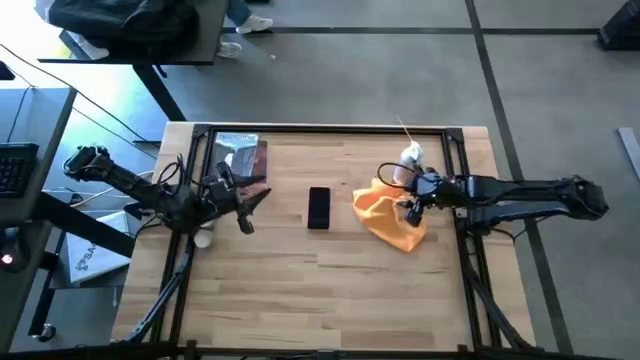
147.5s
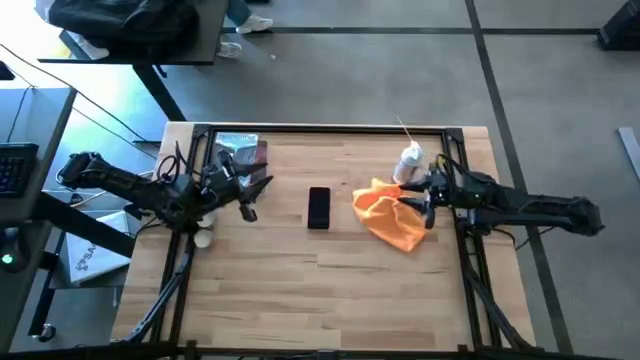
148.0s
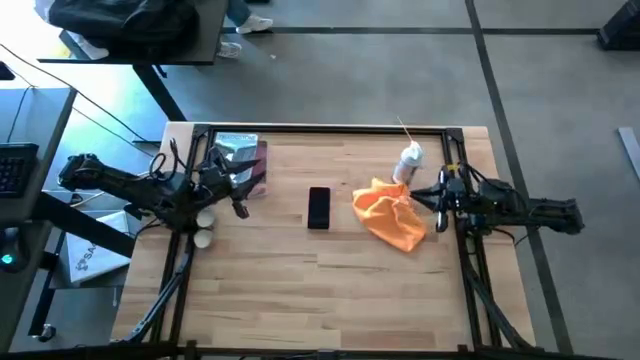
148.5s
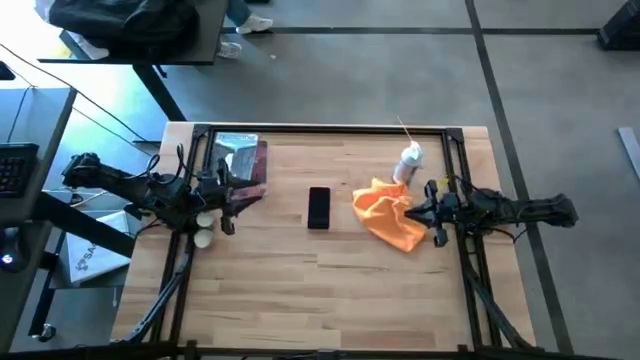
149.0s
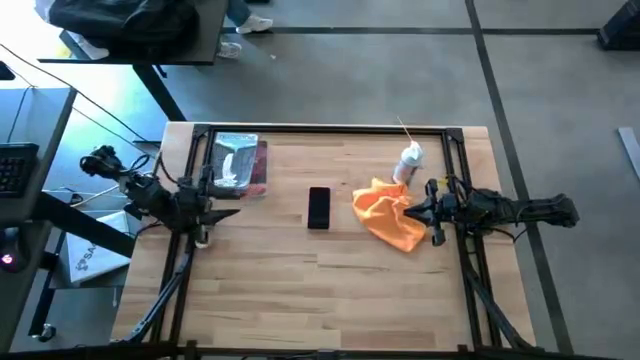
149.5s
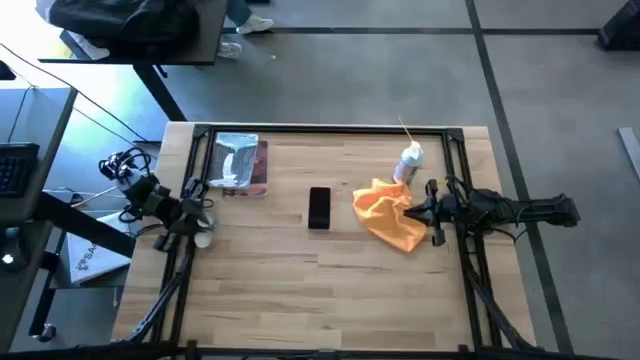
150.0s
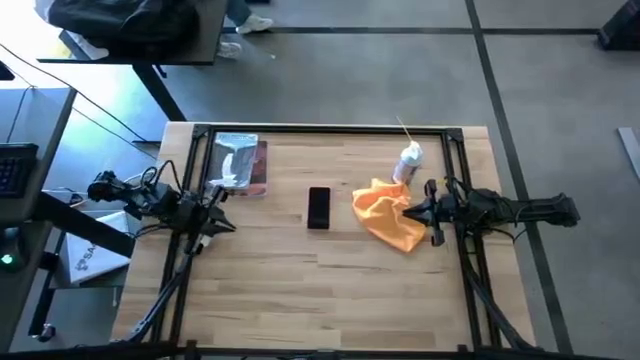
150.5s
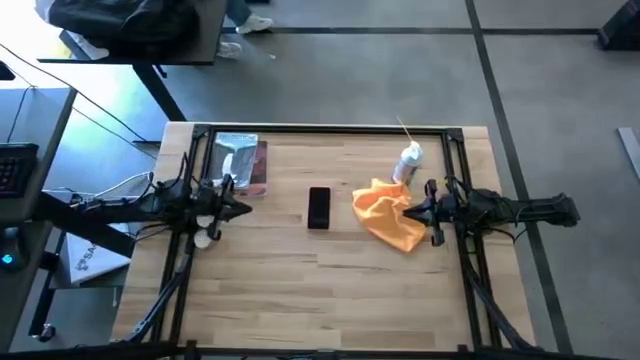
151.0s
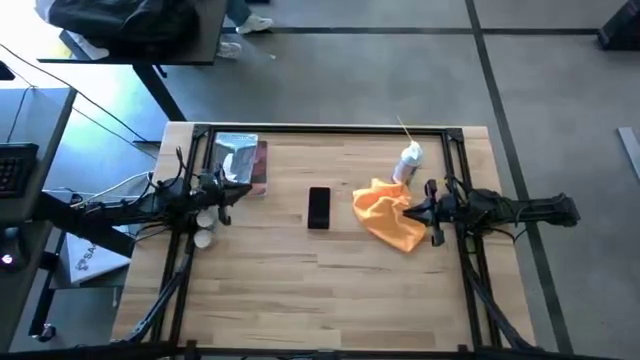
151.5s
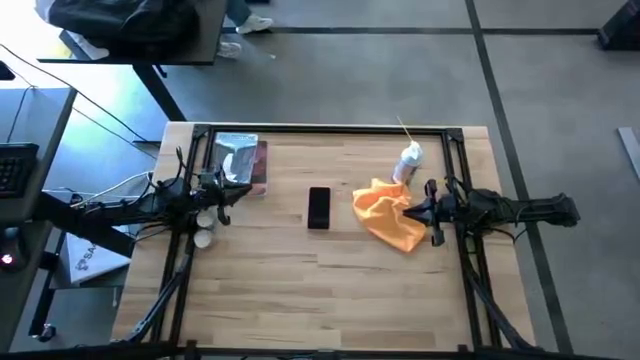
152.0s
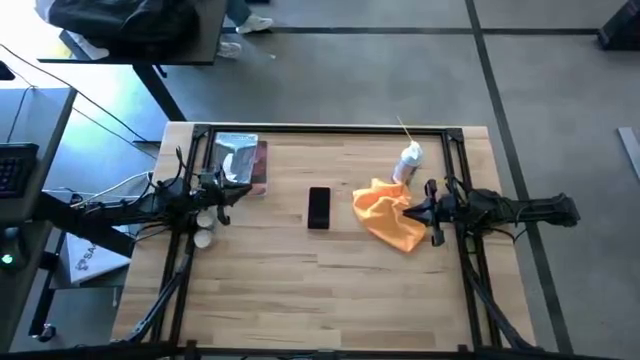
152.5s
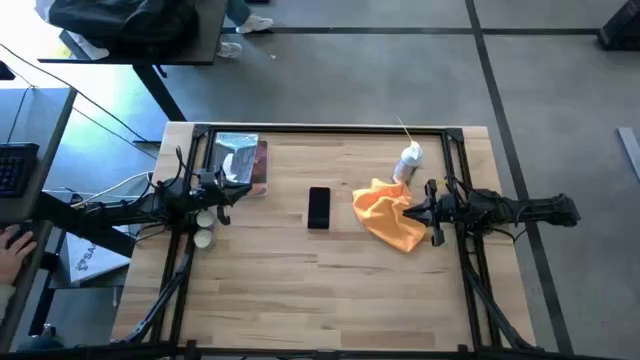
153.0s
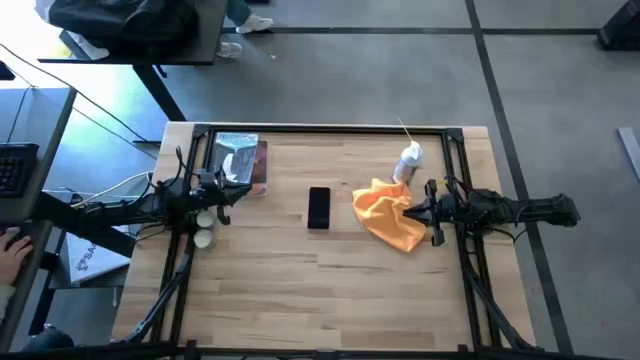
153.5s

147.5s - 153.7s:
Task: Apply microfiber cloth
Return to Home Position

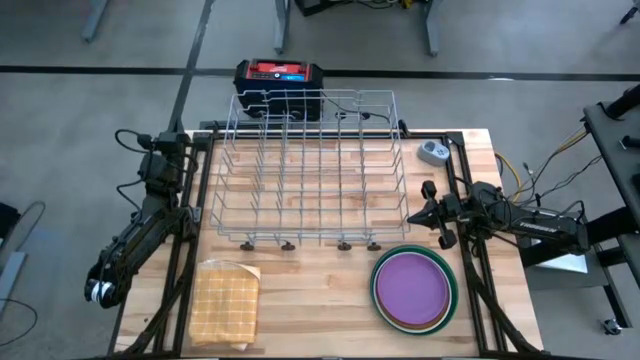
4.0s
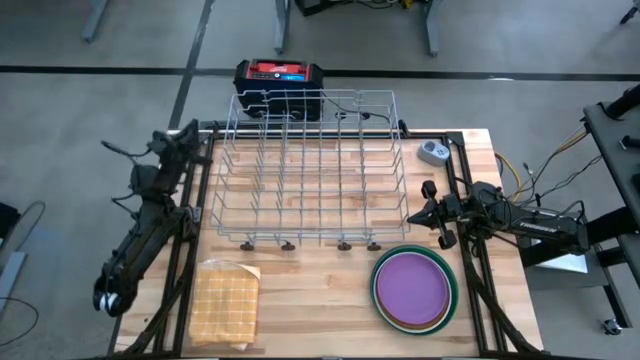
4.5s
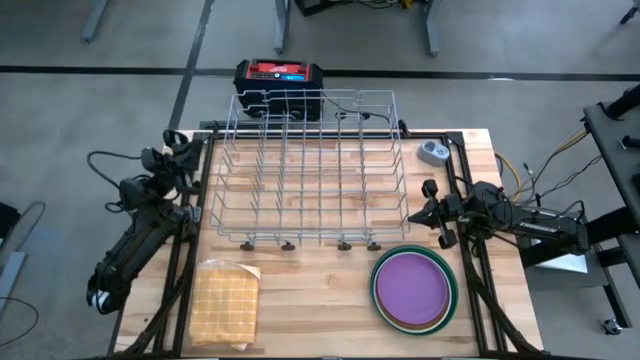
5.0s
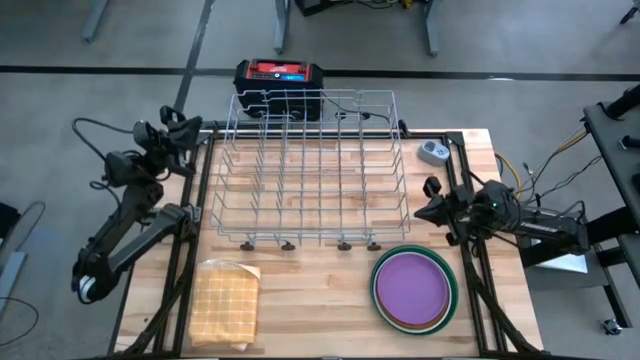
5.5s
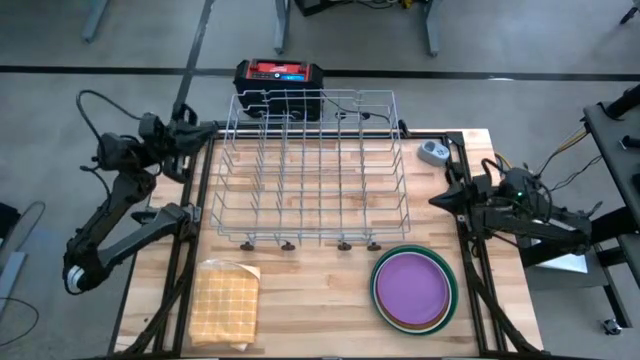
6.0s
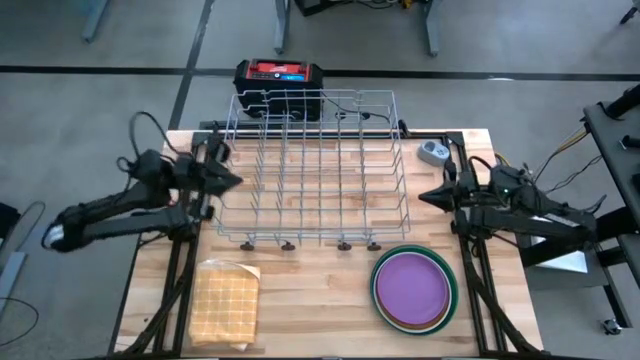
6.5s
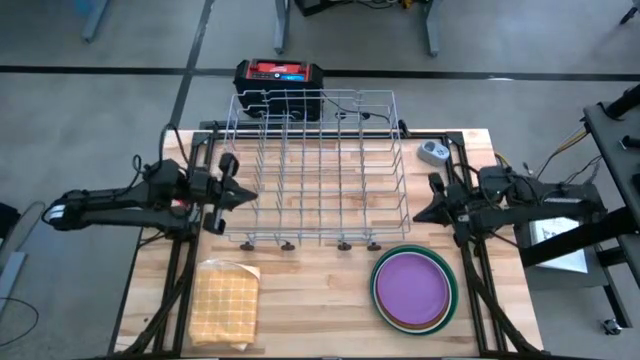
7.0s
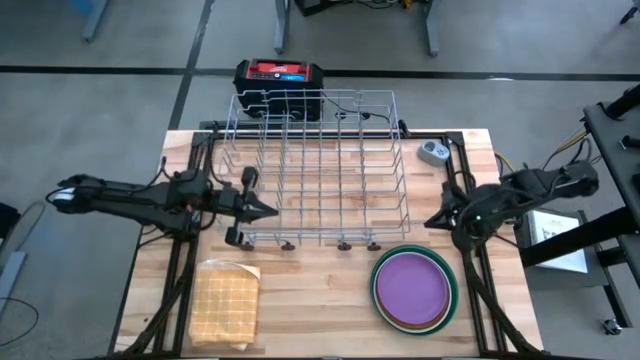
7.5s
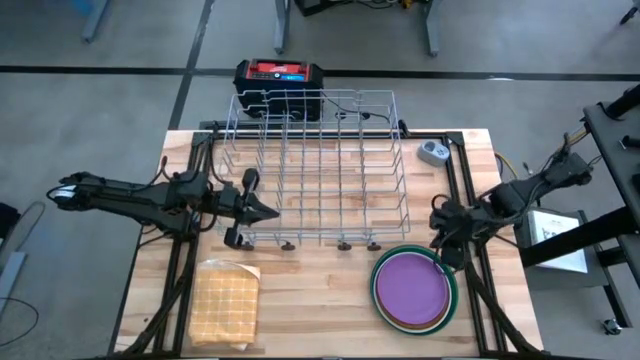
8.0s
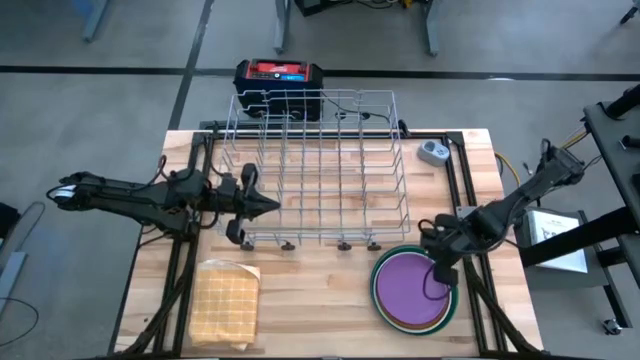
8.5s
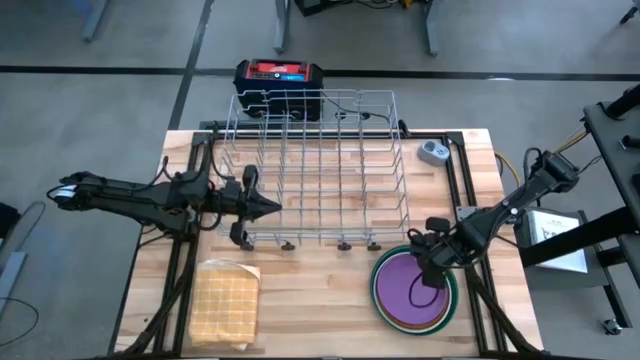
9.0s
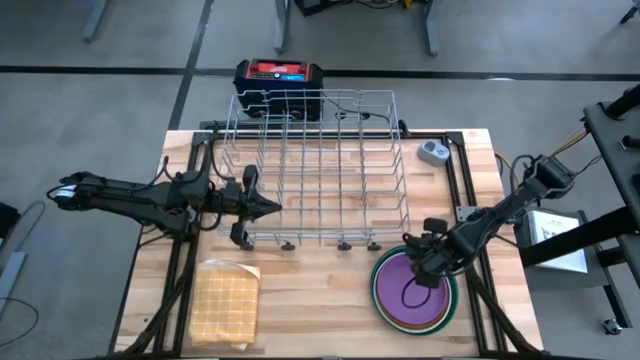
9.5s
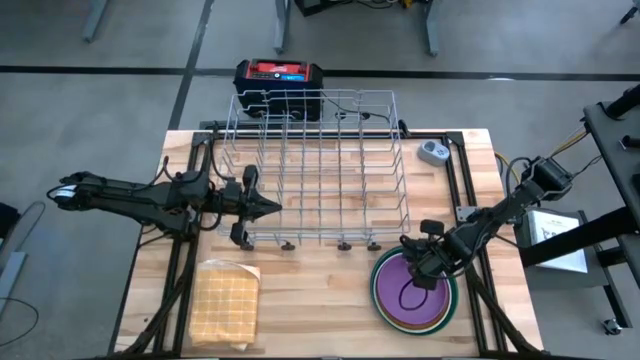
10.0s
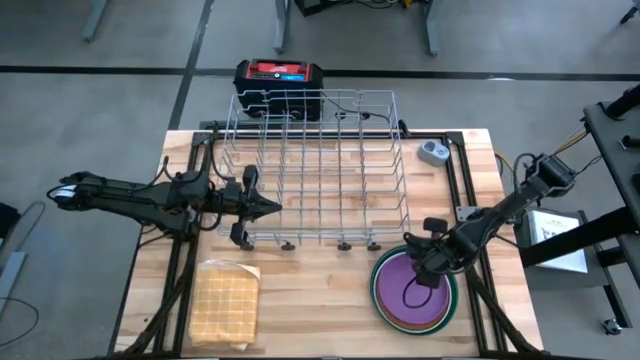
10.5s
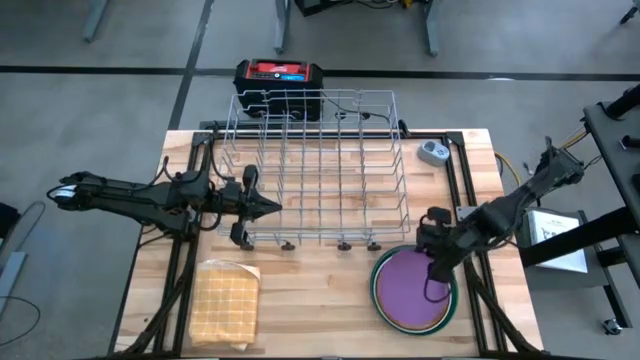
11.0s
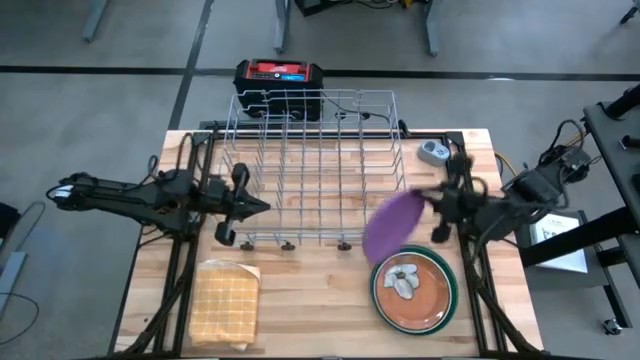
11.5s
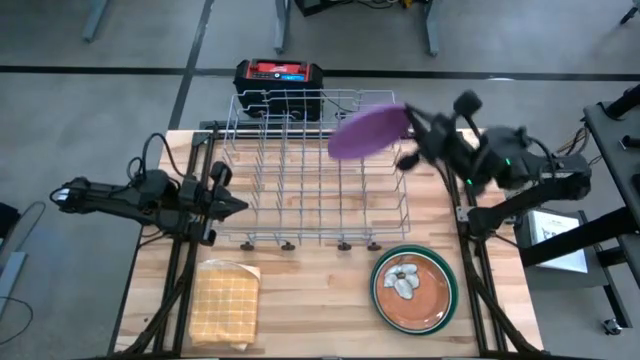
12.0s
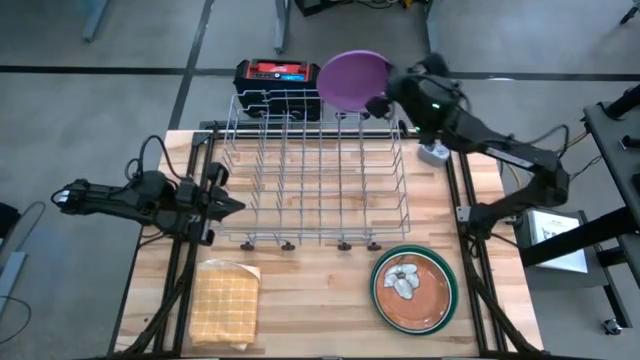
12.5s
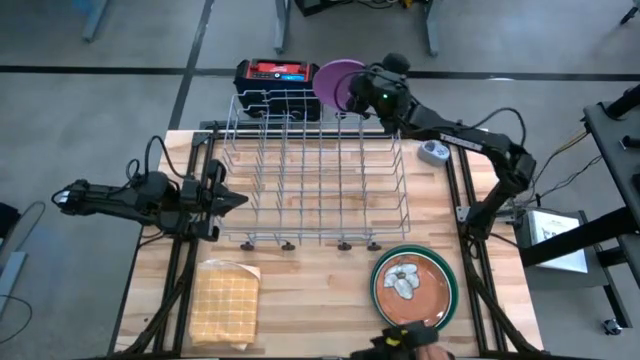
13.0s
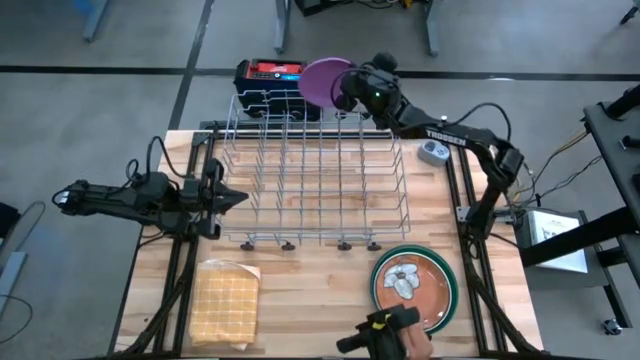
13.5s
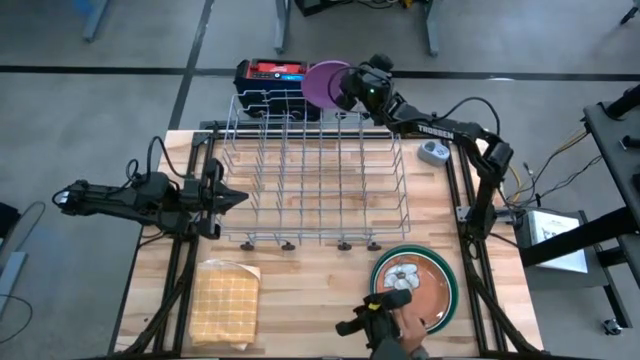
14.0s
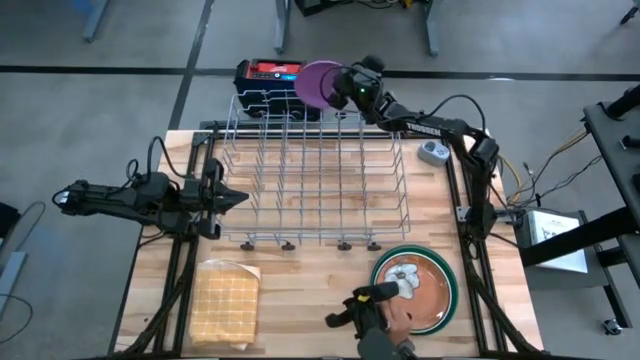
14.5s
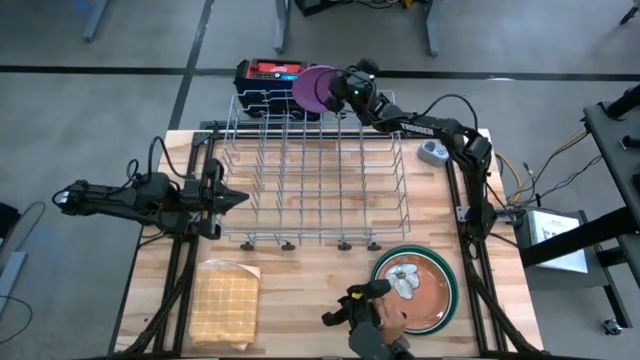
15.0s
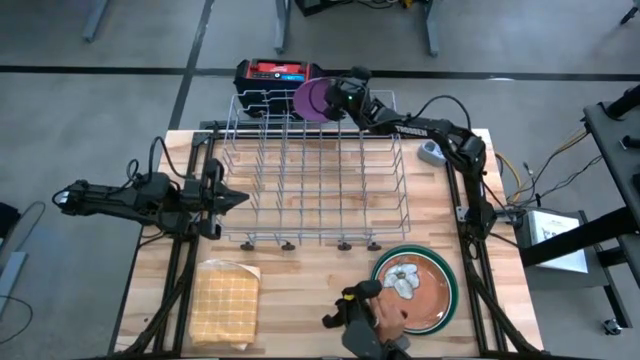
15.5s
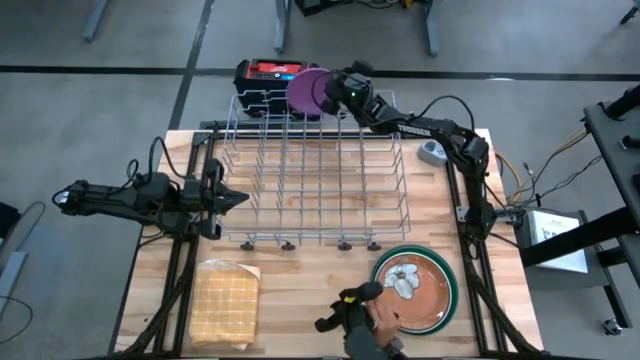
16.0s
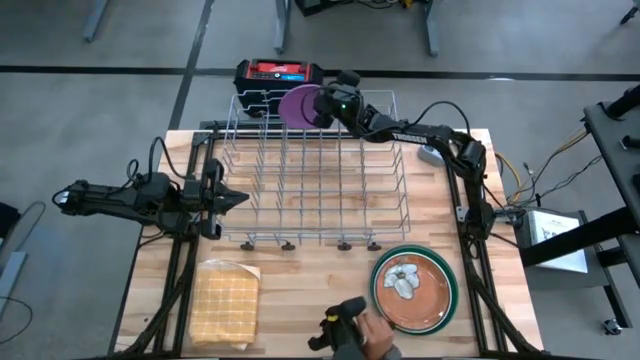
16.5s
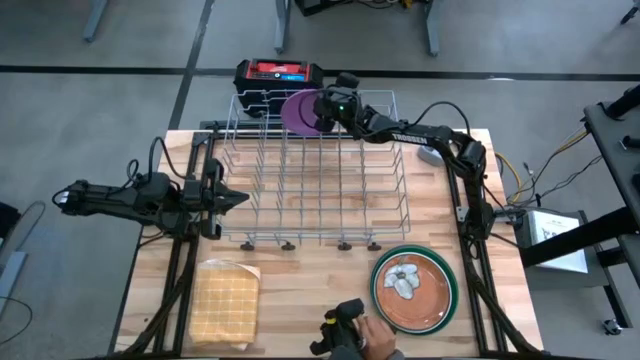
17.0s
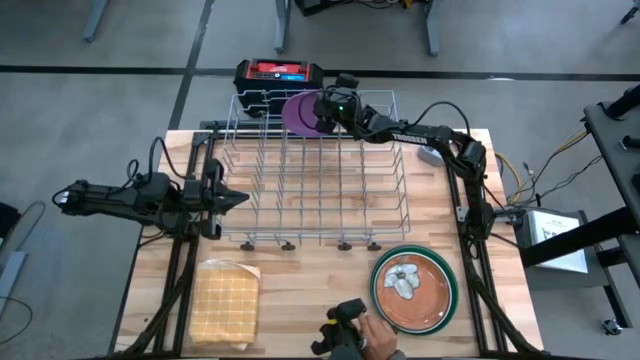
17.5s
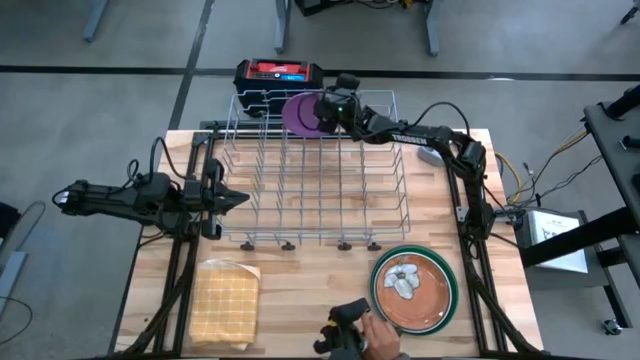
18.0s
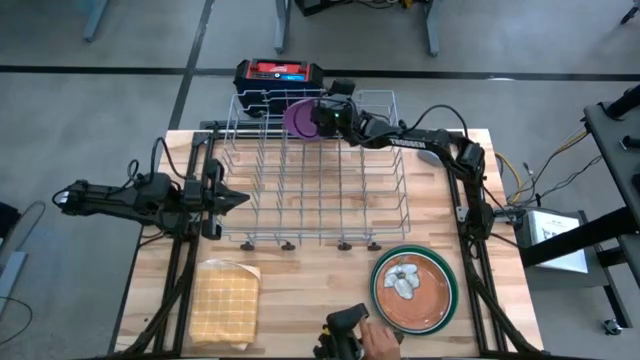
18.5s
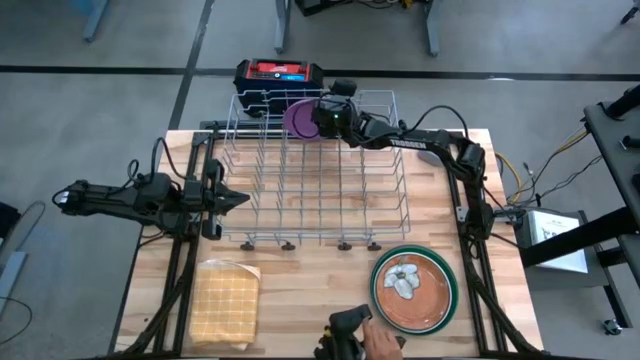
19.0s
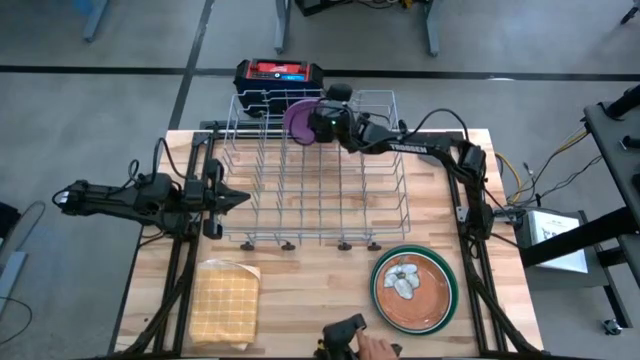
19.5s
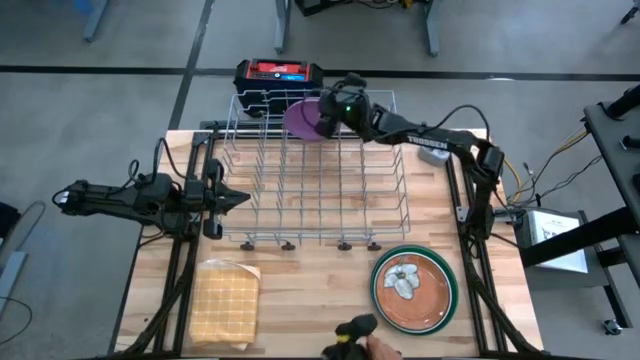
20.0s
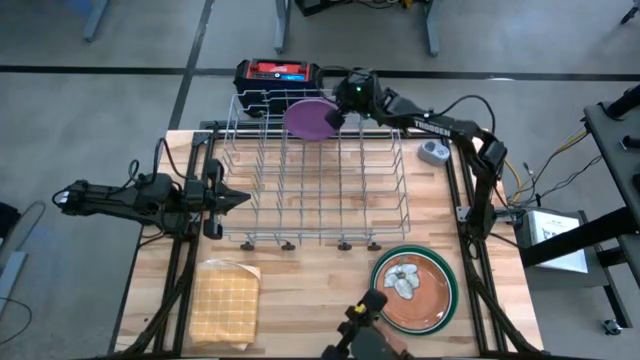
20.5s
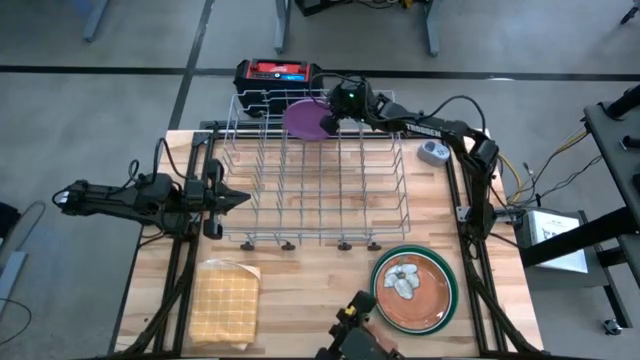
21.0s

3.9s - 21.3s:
Task: Sort dishes
Put the purple plate into the dish rack
